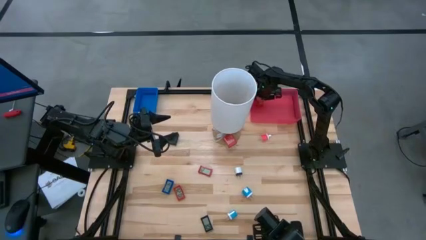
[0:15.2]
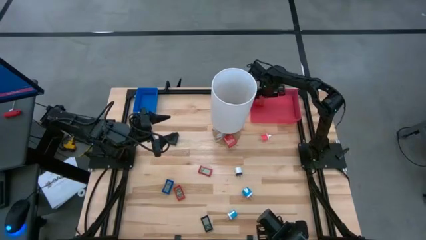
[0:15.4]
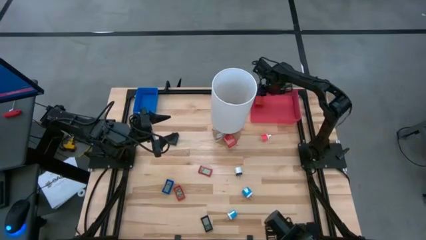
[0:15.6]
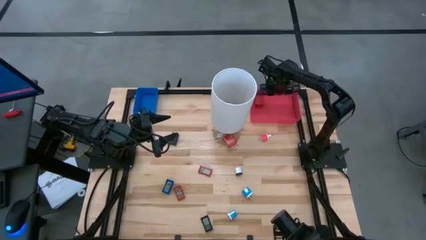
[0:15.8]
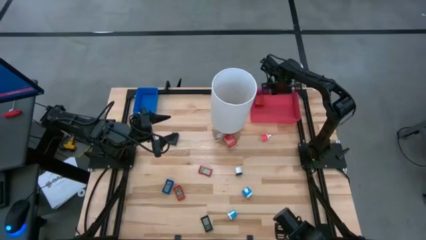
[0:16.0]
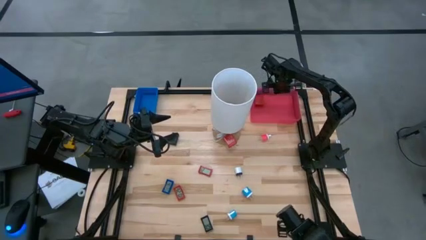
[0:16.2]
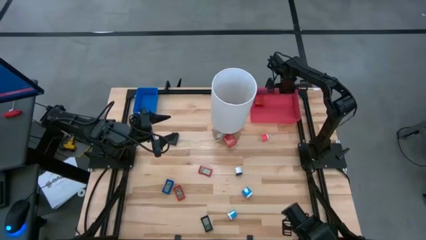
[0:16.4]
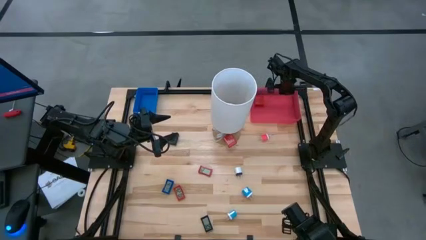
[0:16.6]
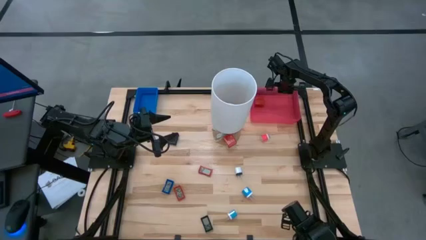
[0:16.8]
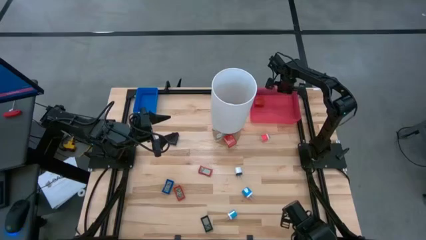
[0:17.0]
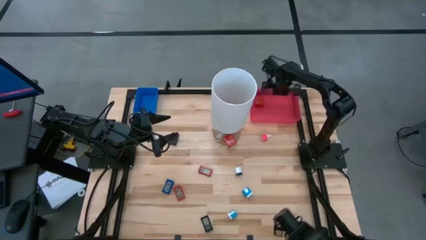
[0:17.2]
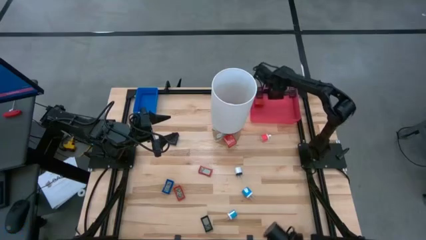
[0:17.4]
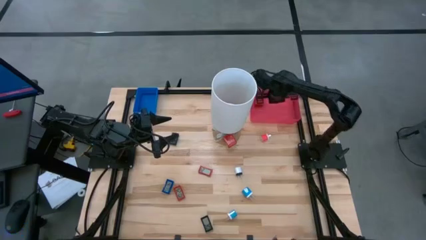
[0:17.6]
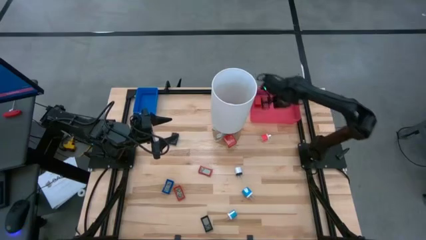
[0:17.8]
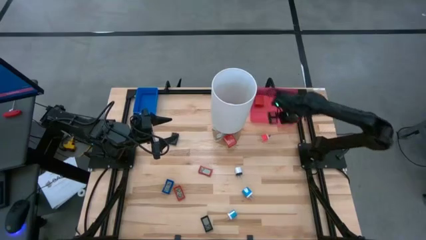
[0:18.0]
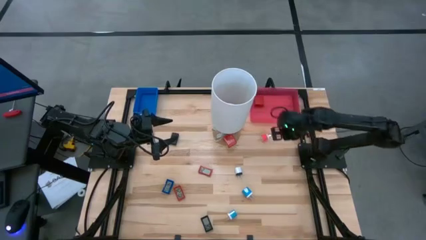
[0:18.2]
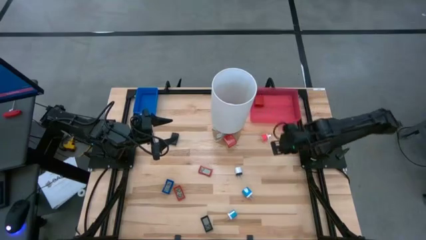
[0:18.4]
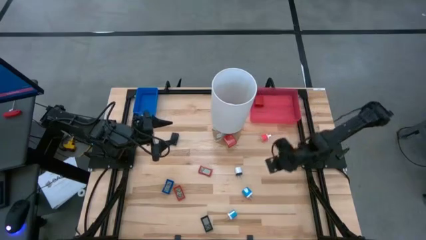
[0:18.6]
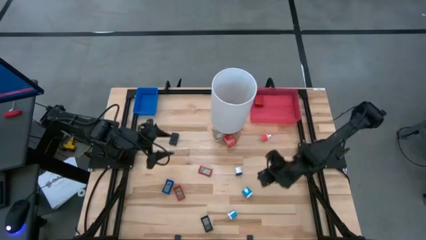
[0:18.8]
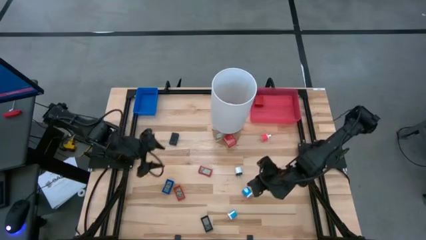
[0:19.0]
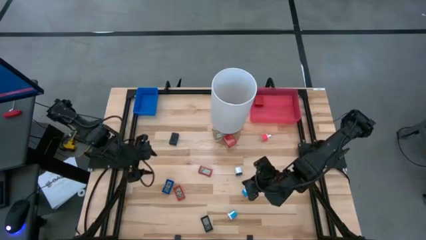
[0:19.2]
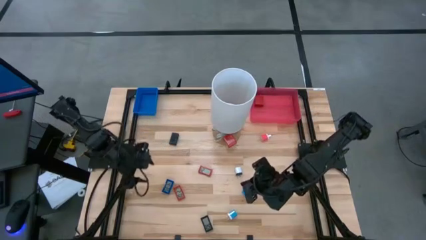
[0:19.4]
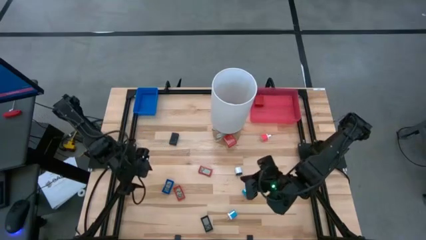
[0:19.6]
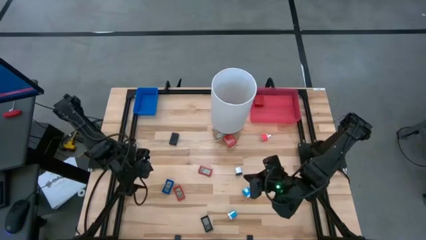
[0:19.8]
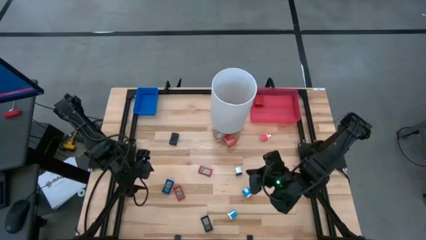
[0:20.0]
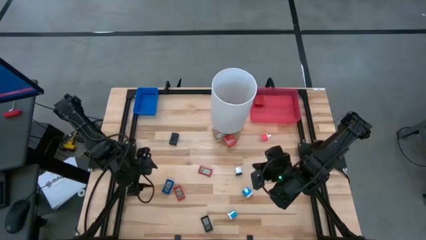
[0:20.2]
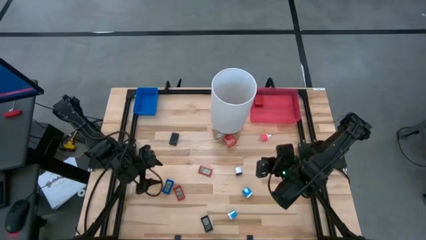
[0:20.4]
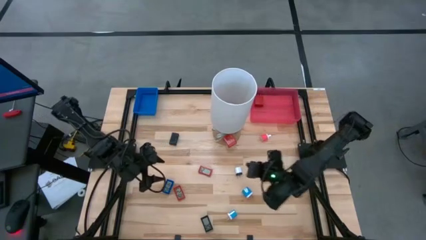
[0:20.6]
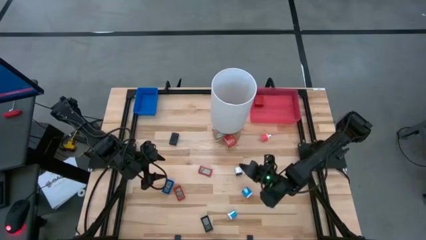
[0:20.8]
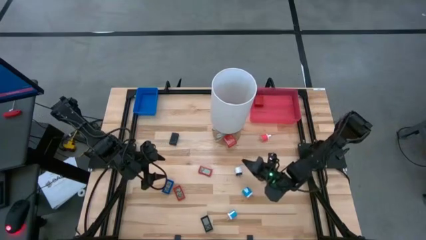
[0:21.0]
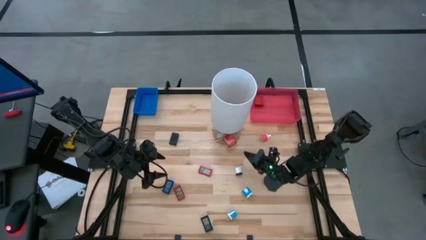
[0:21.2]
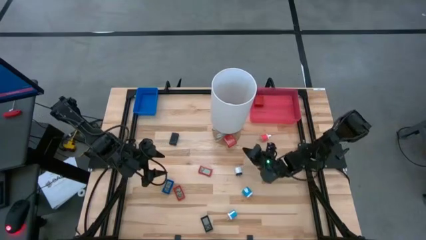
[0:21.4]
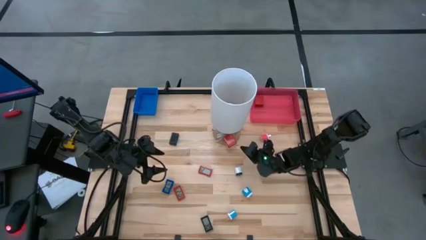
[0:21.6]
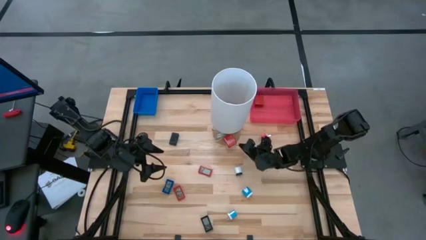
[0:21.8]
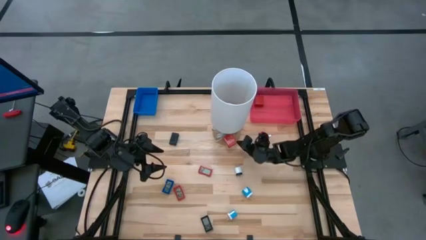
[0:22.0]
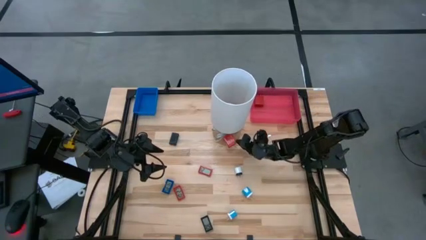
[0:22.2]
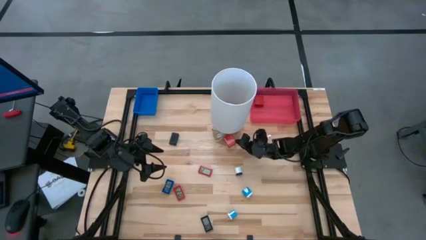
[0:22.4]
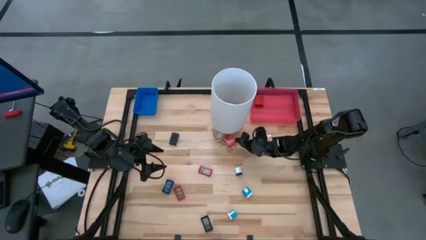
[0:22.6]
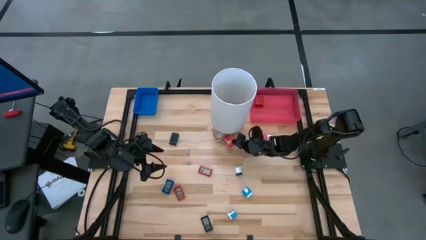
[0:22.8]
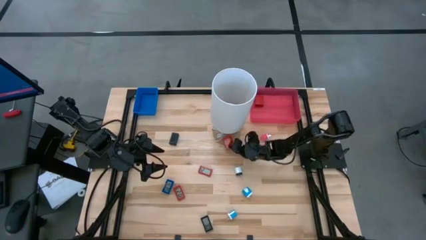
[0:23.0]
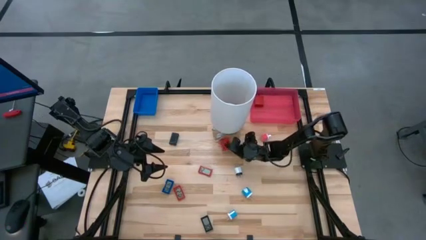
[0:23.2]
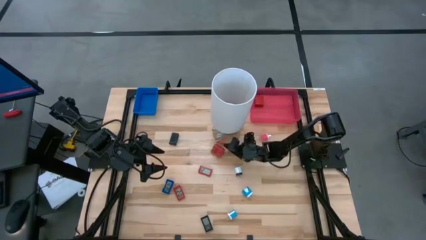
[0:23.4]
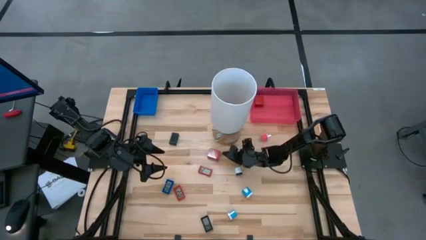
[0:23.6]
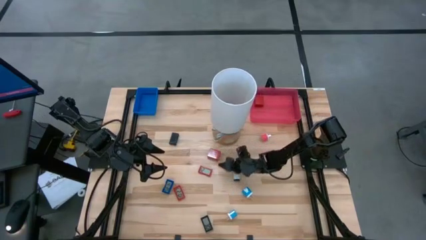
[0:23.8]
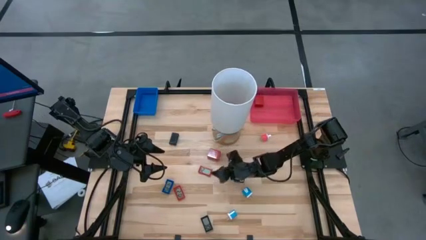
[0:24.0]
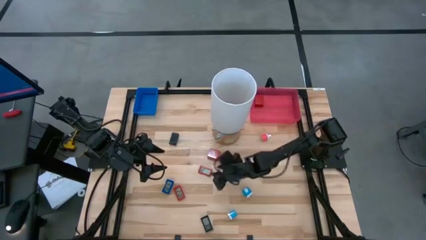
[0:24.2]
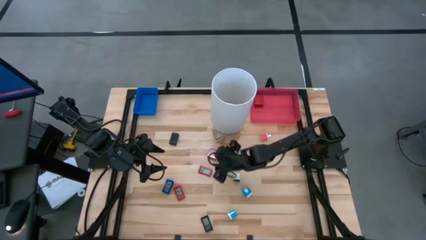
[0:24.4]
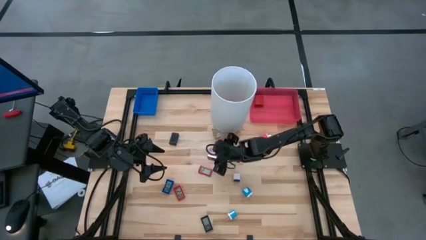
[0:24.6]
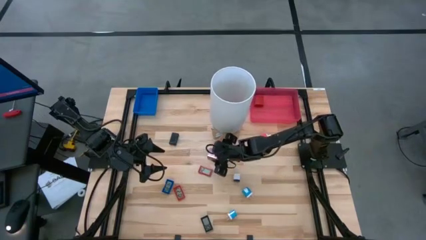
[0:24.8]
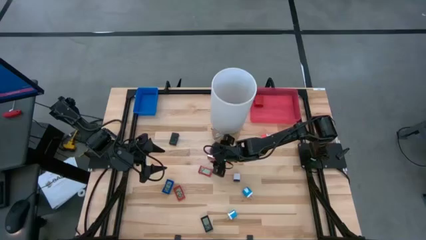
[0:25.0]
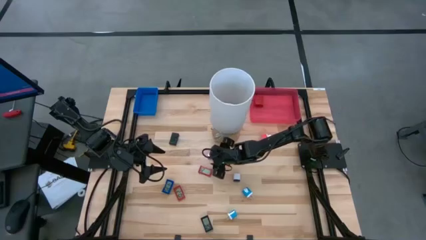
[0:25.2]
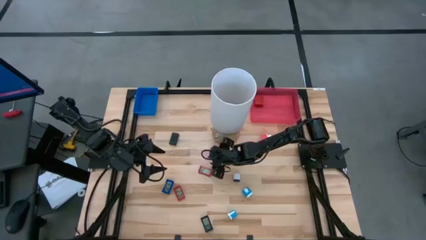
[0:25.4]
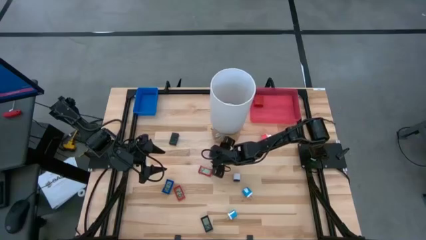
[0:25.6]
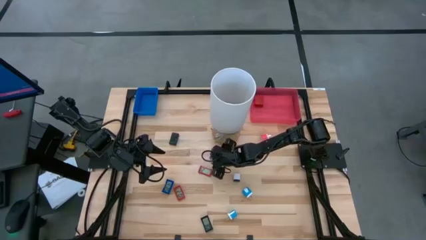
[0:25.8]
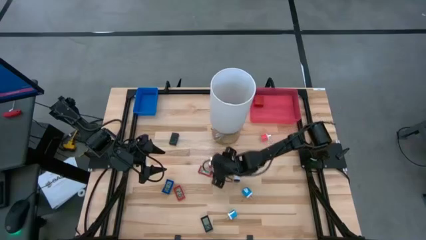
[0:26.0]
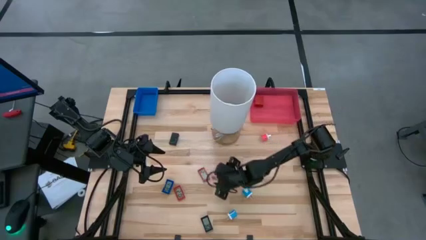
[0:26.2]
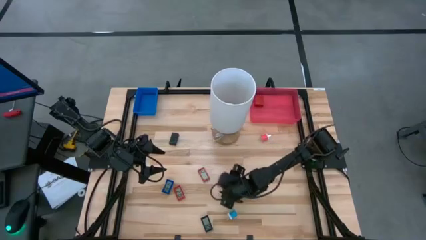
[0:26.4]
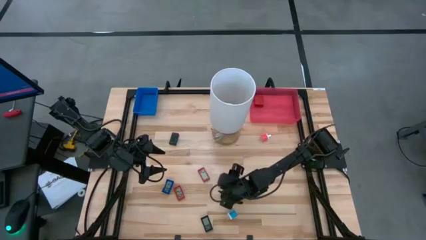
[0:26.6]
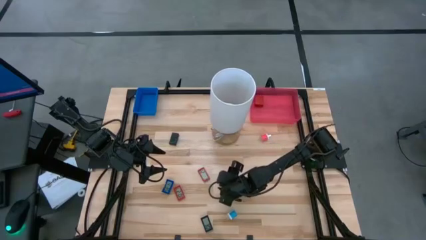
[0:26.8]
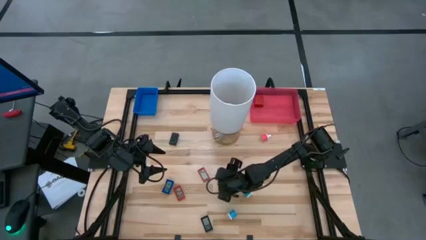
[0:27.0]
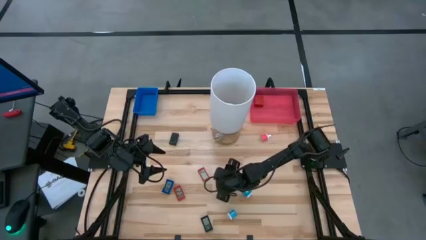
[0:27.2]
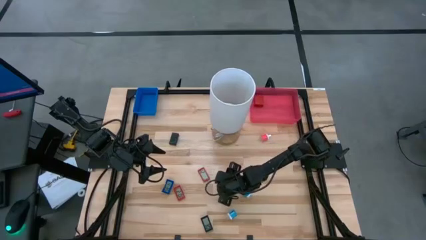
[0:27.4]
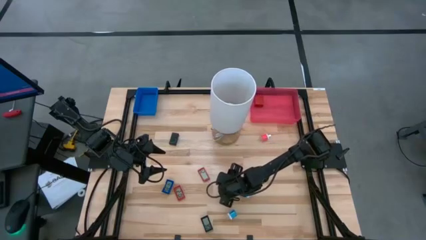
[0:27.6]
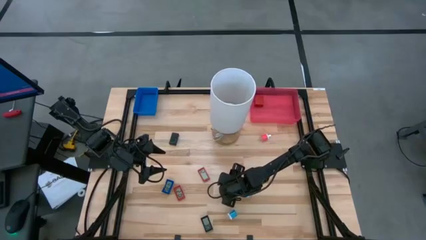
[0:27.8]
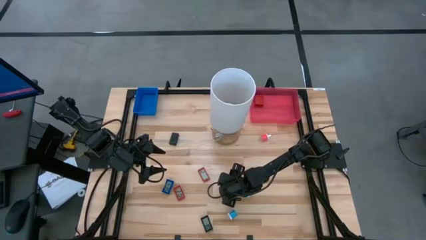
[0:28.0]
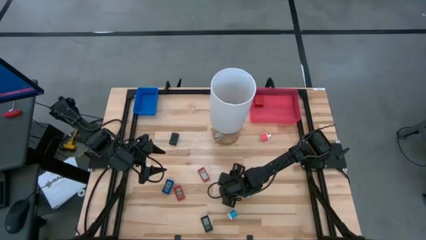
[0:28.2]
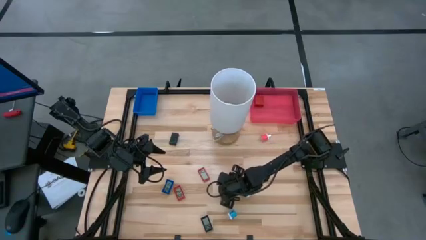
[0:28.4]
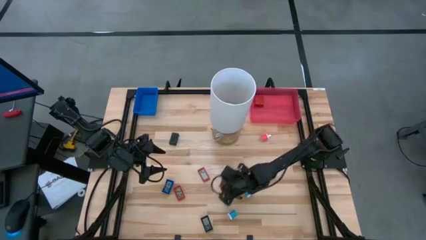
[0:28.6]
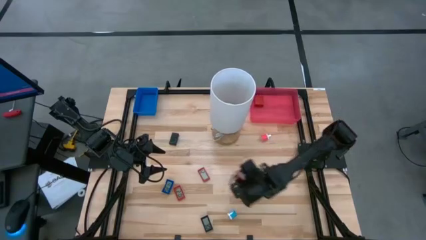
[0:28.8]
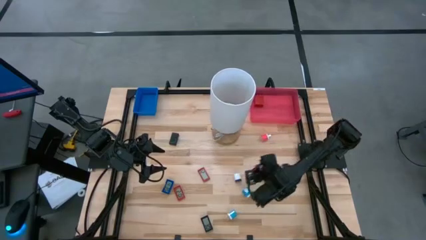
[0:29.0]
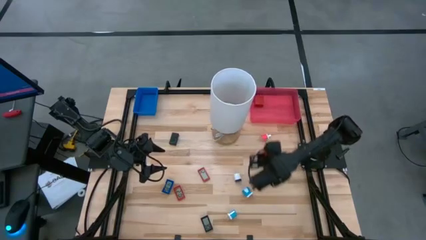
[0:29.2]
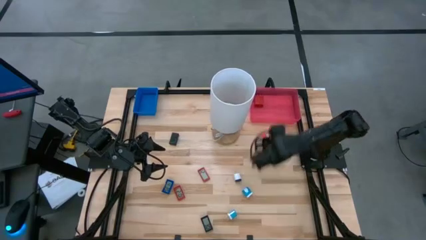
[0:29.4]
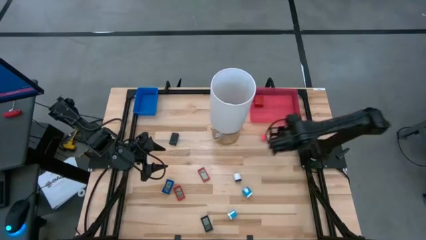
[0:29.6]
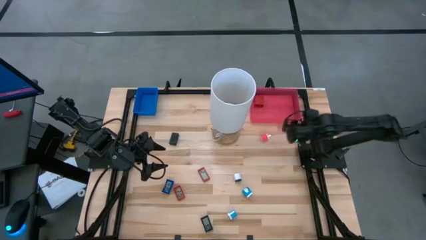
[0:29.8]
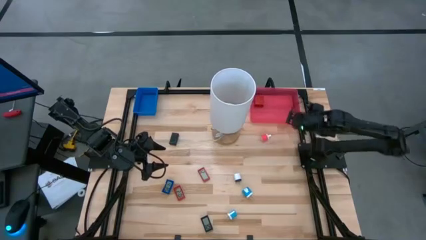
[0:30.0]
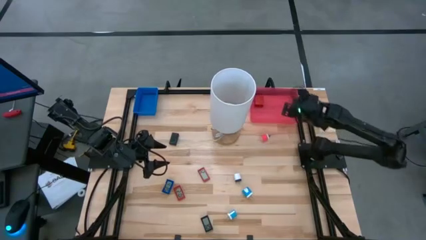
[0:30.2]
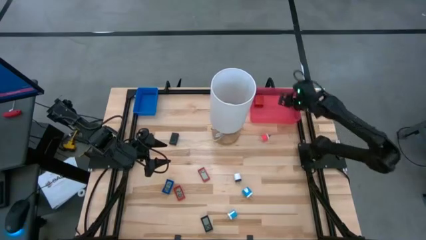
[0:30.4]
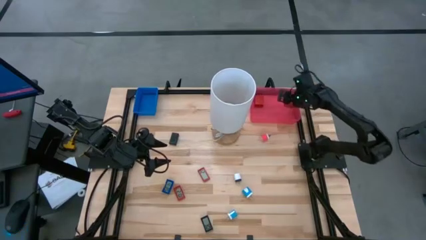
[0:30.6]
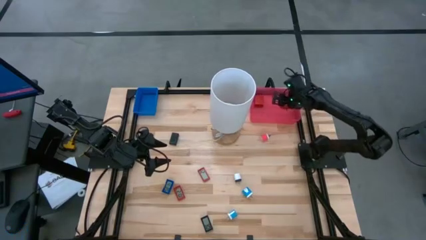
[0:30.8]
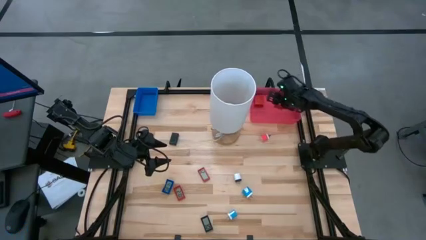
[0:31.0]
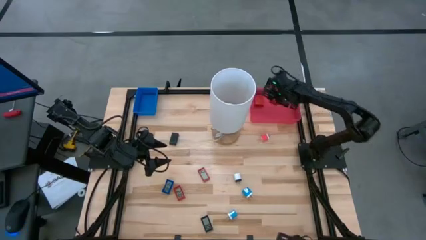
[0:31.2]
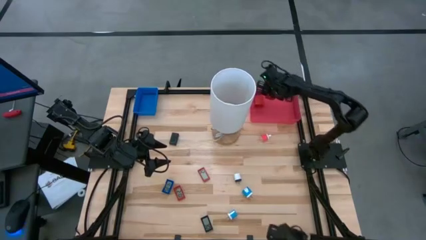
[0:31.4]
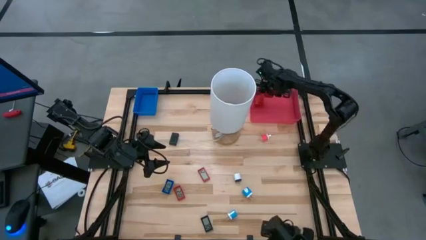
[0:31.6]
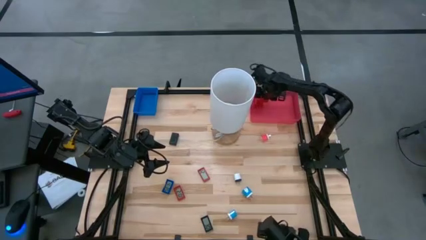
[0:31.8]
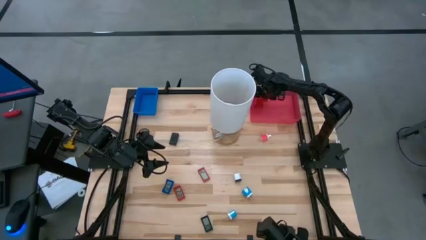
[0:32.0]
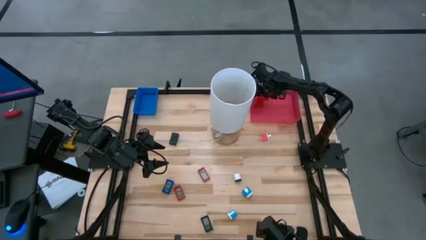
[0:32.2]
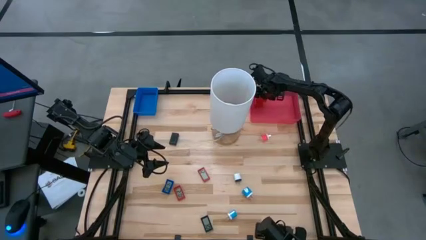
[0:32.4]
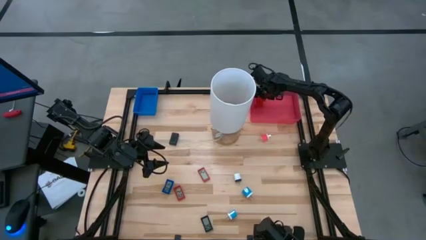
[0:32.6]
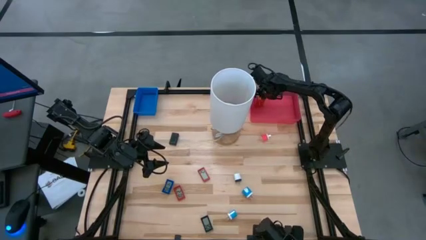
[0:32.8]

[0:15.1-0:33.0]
Task: Pick & Place Office items
Put the red charger adapter into the pink bin
